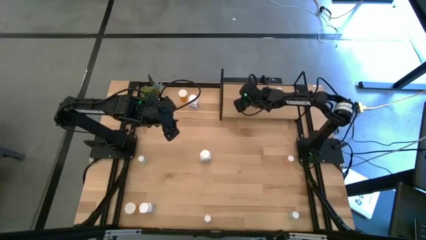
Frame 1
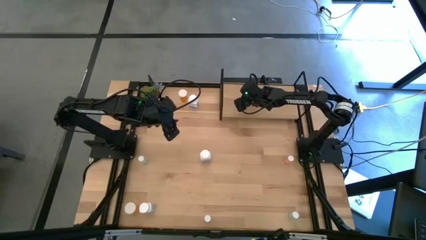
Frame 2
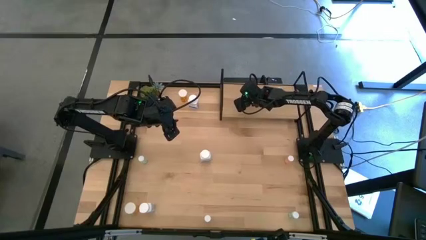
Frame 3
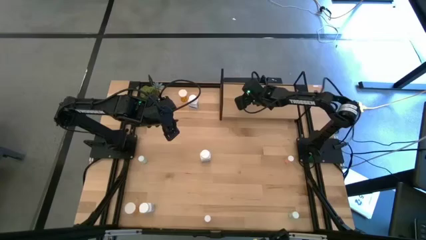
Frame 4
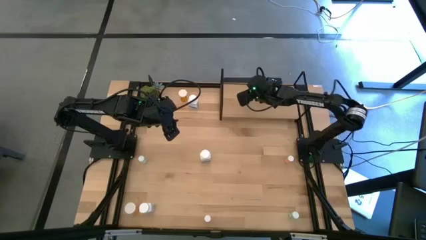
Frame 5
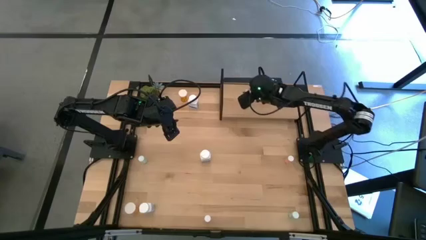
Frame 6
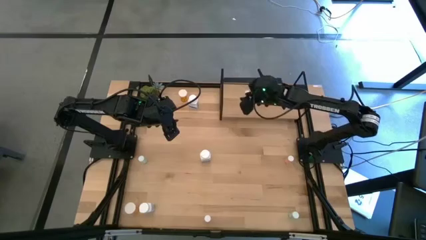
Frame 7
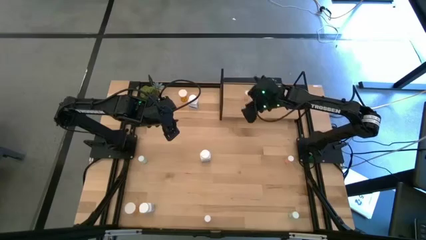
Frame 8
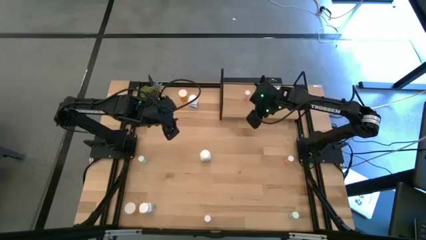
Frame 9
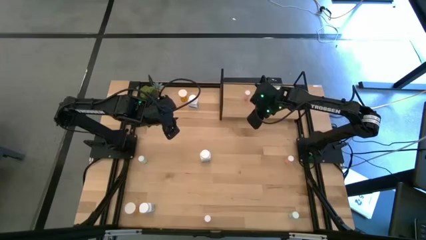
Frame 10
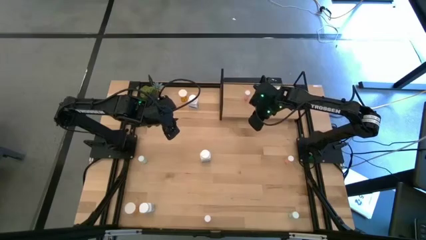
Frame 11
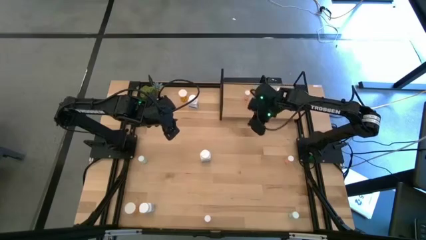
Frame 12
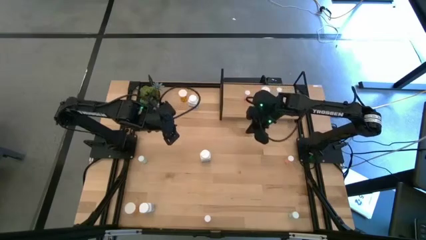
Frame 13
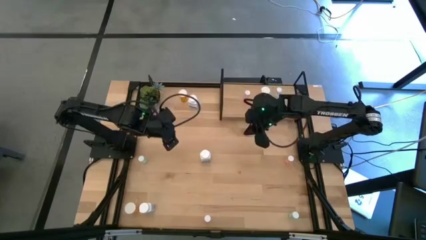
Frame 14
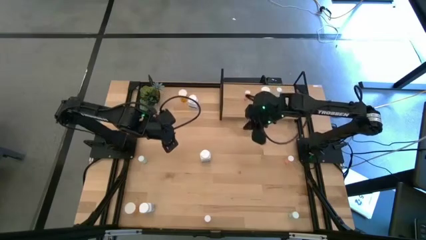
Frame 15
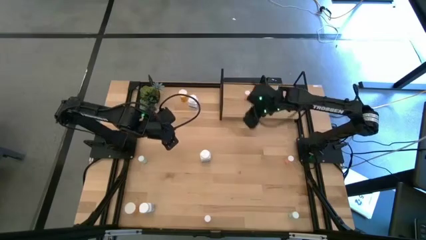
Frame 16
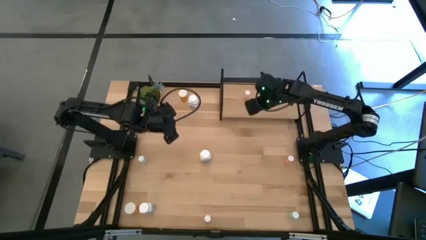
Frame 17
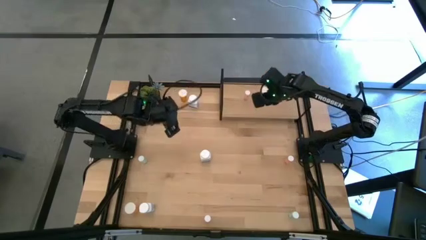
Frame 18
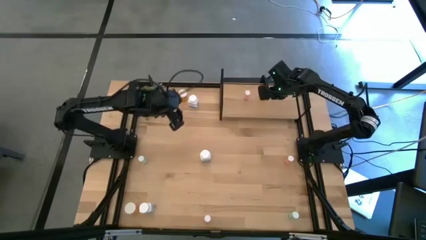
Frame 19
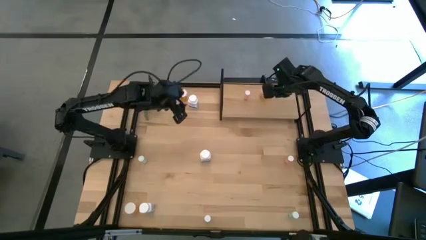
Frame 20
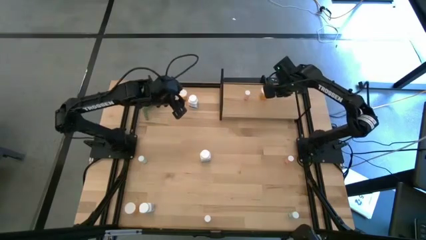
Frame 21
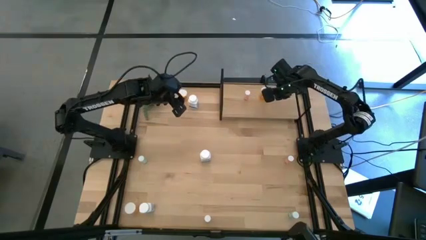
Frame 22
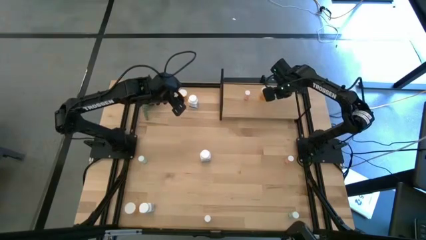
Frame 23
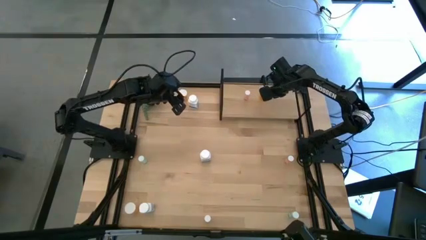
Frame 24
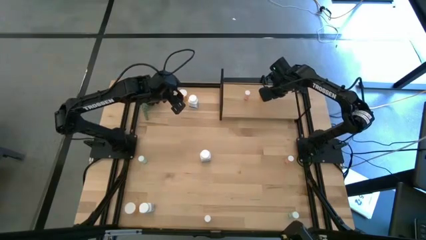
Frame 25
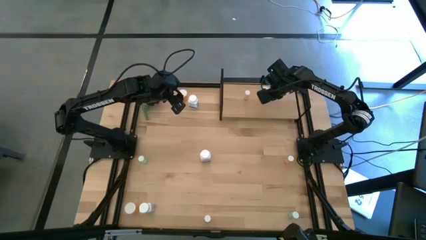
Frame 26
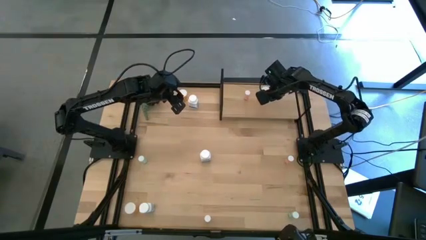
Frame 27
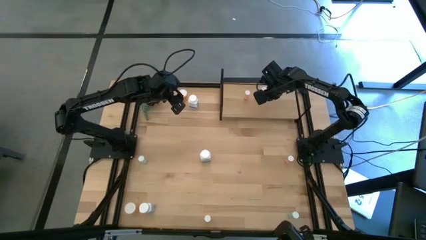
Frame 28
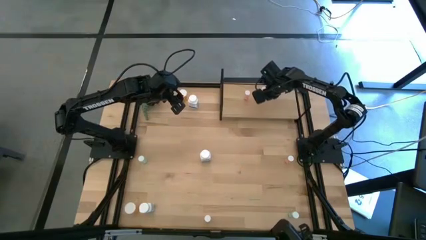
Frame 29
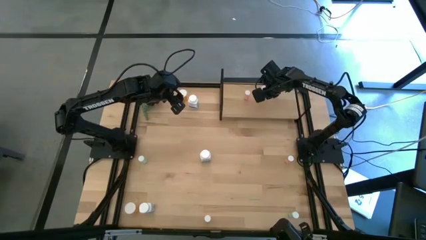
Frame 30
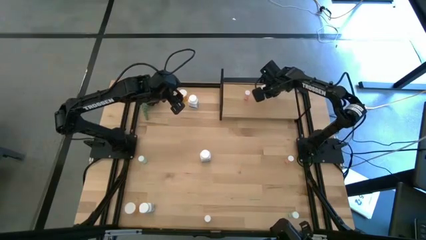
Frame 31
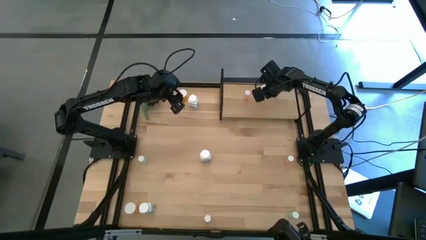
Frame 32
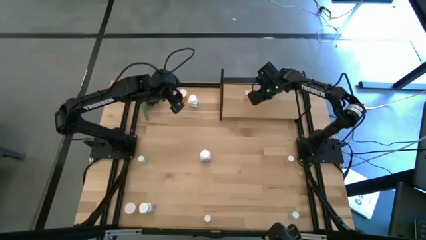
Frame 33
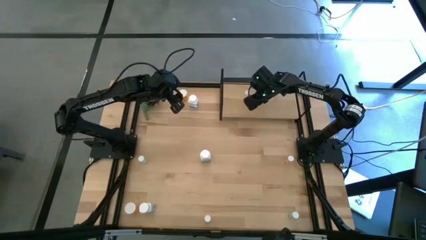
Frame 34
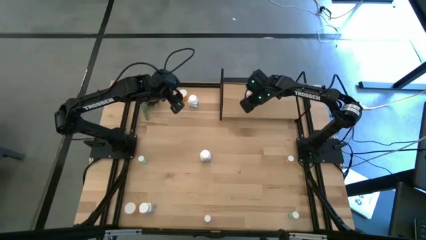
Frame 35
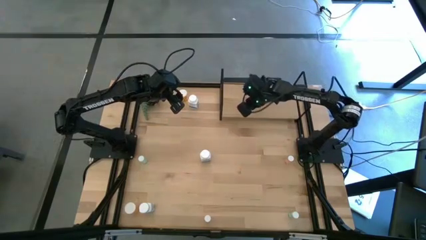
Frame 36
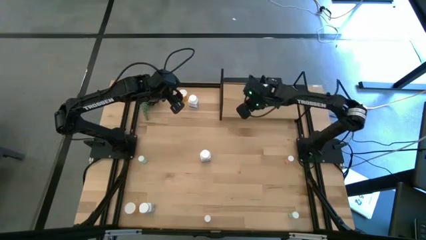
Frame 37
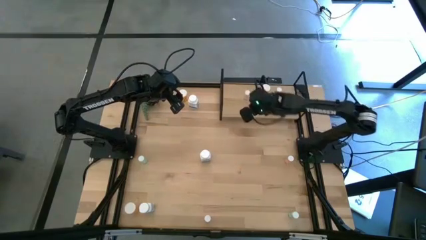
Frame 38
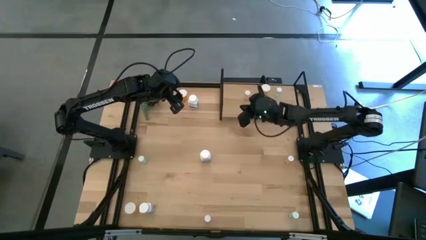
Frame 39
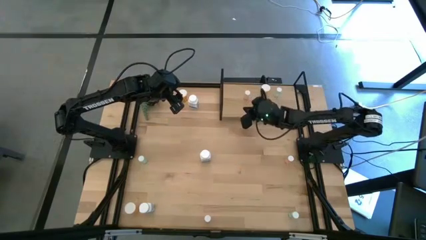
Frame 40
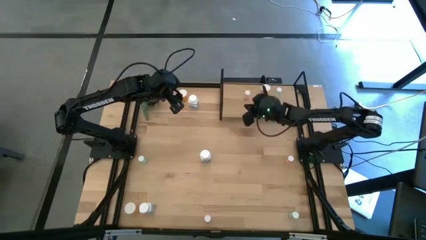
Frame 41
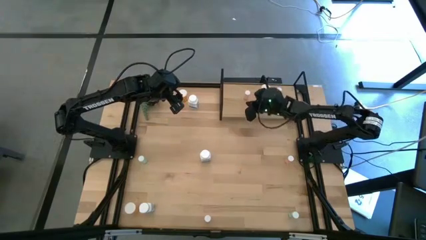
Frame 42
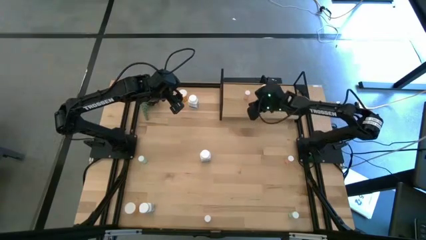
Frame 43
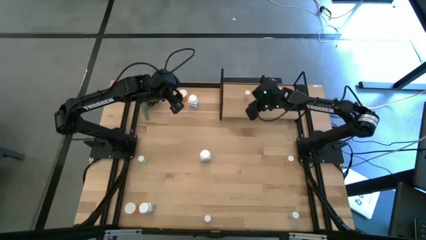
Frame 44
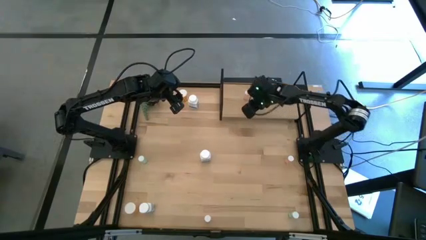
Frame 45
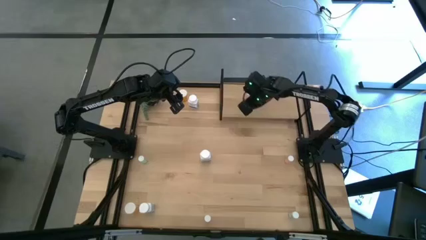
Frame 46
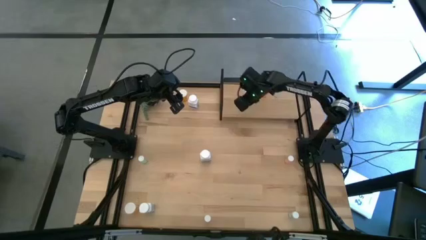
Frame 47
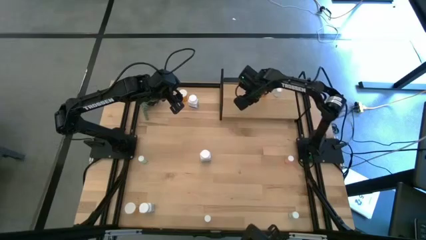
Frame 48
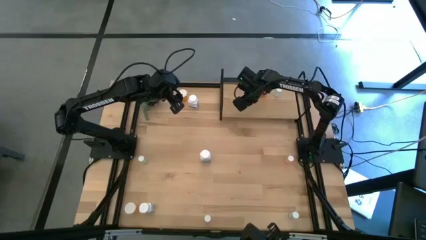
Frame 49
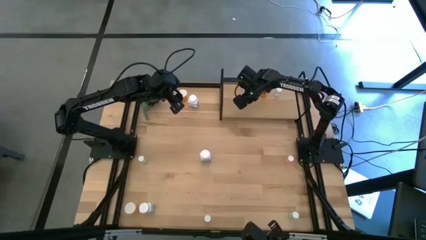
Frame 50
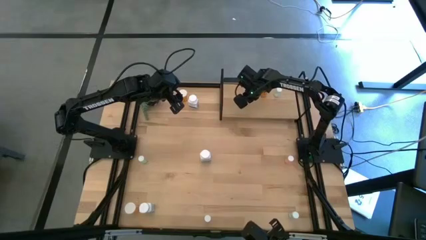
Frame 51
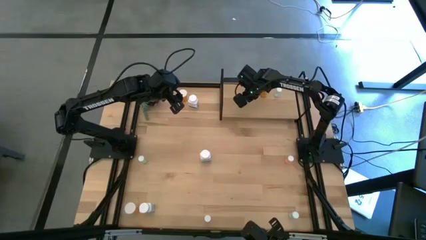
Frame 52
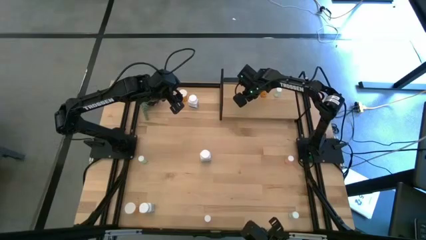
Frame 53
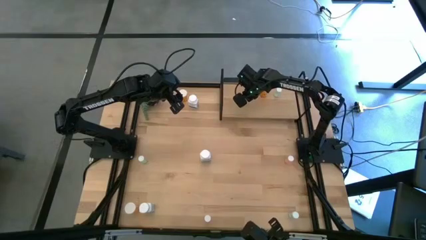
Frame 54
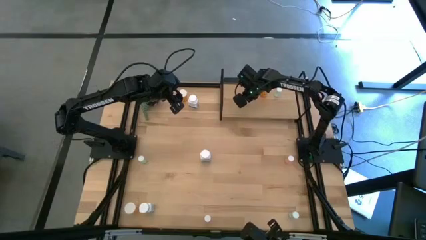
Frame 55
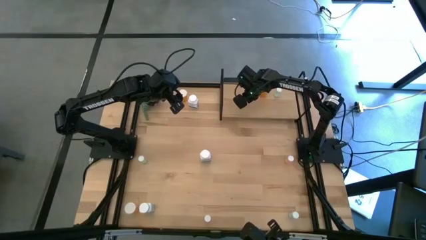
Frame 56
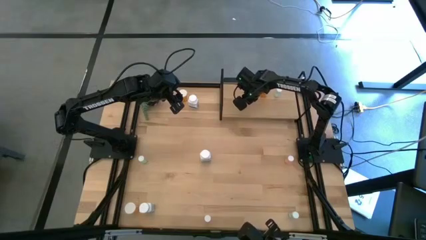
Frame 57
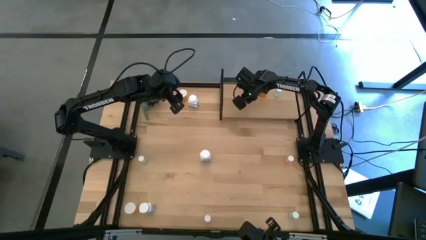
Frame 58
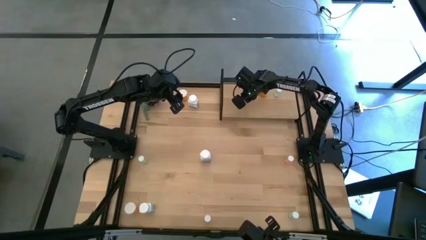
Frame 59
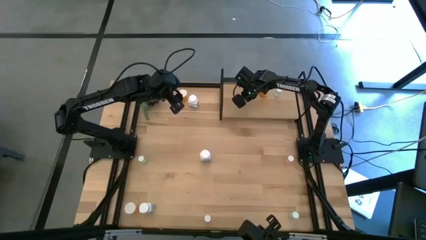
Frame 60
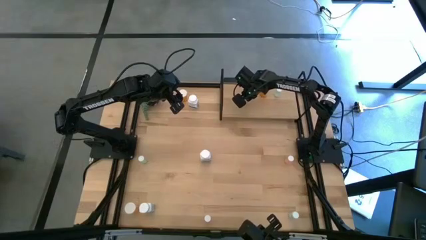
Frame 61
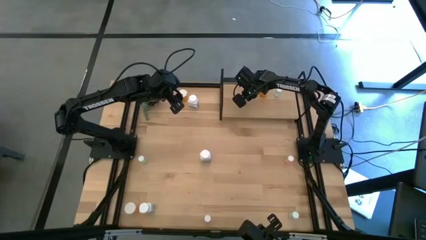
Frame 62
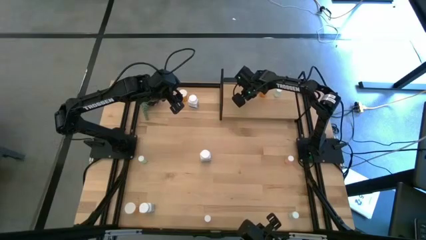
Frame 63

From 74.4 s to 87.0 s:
Task: Pick and place medicine bottles onto shelf by color
Adjust the pill bottles on the shelf
